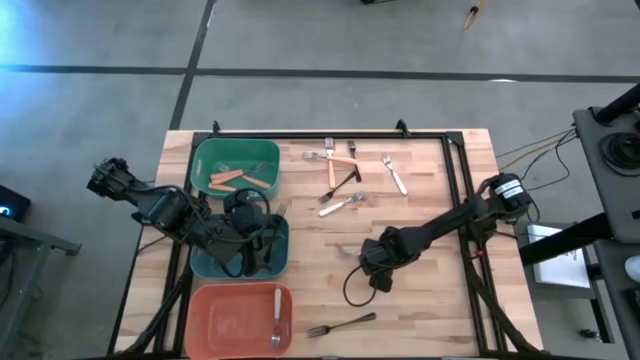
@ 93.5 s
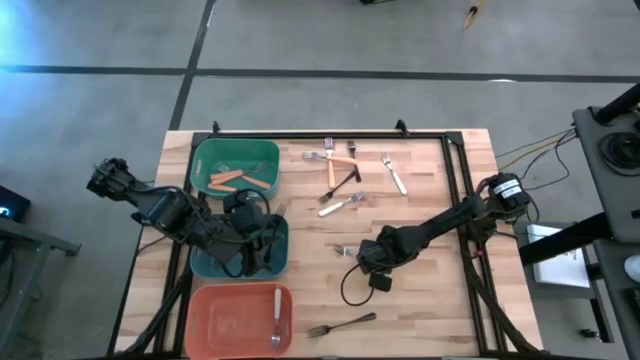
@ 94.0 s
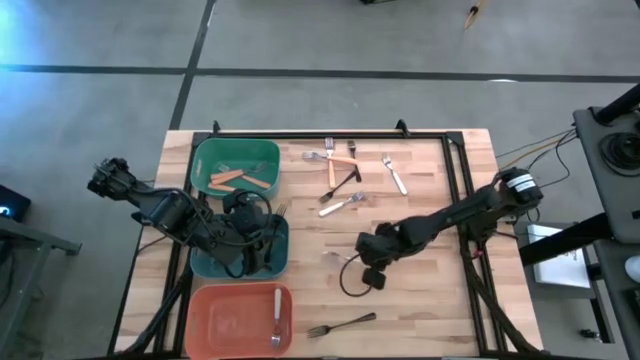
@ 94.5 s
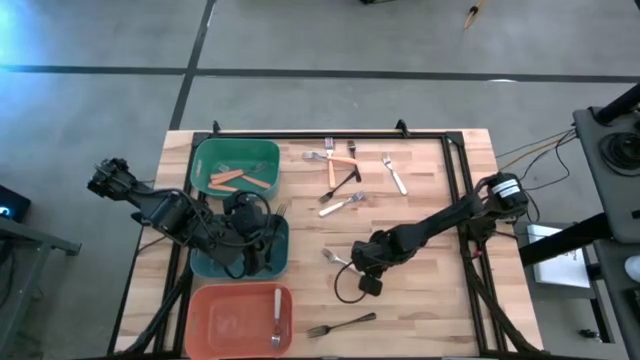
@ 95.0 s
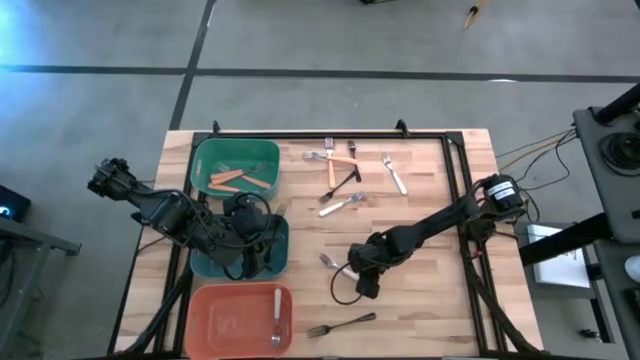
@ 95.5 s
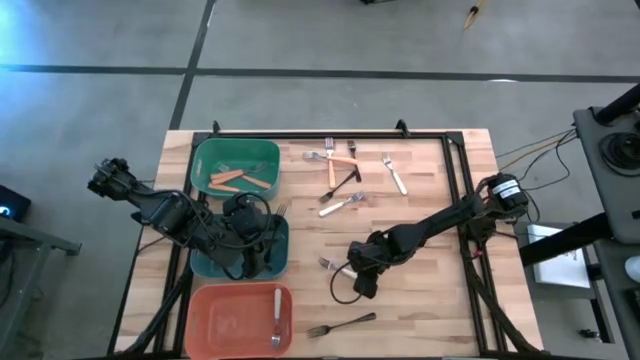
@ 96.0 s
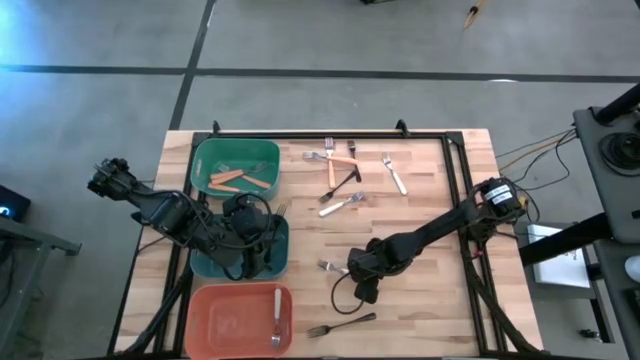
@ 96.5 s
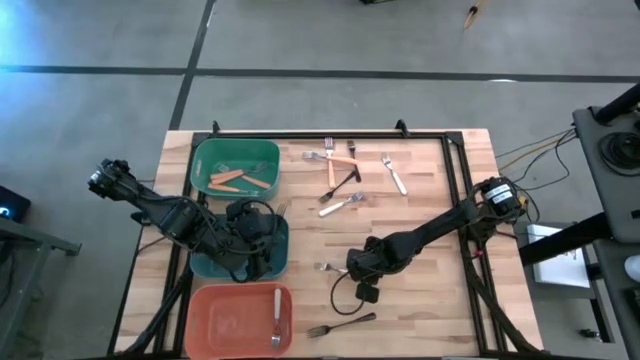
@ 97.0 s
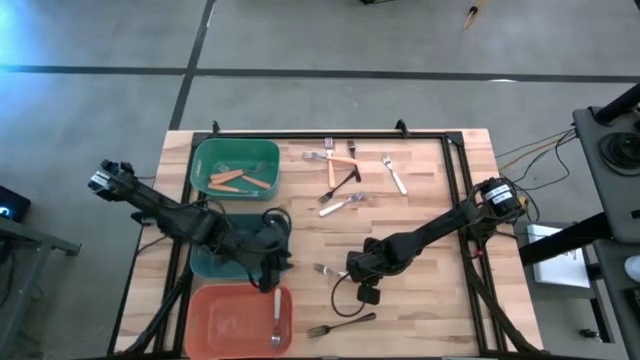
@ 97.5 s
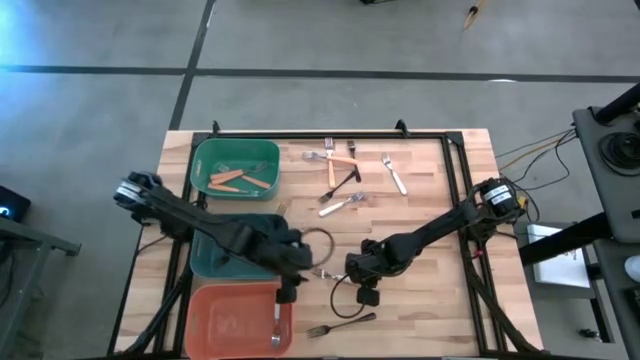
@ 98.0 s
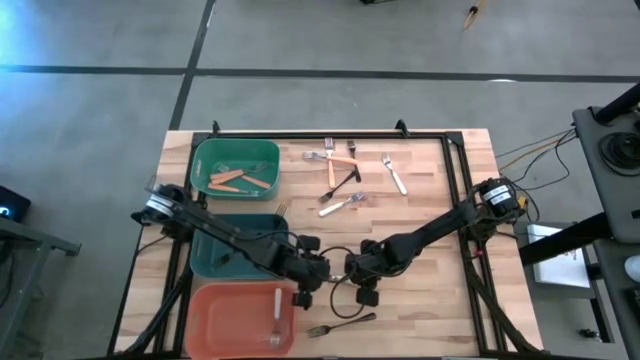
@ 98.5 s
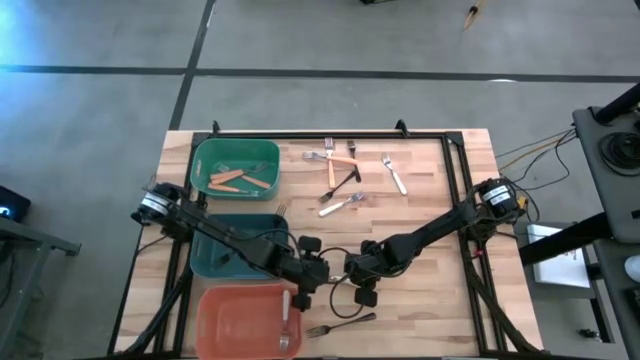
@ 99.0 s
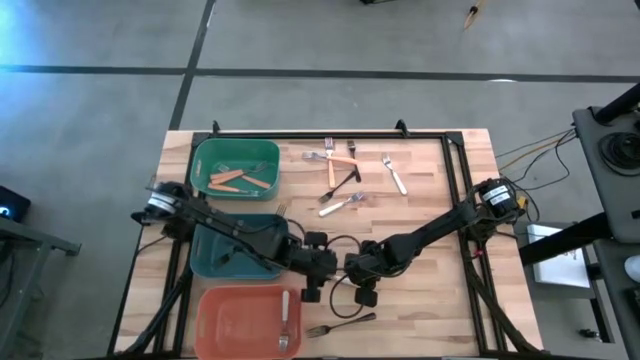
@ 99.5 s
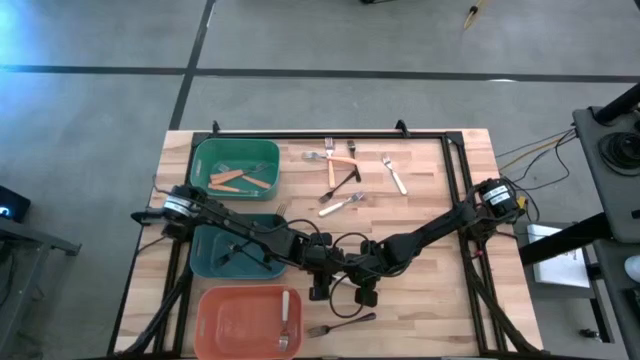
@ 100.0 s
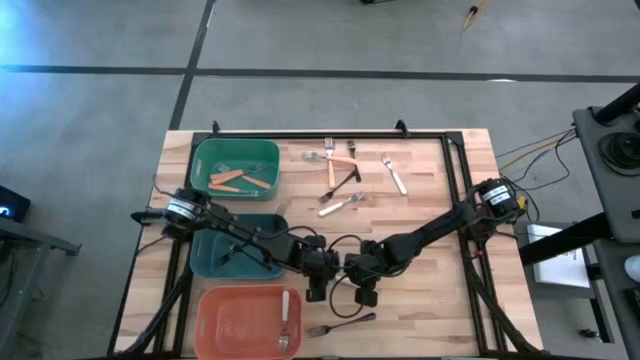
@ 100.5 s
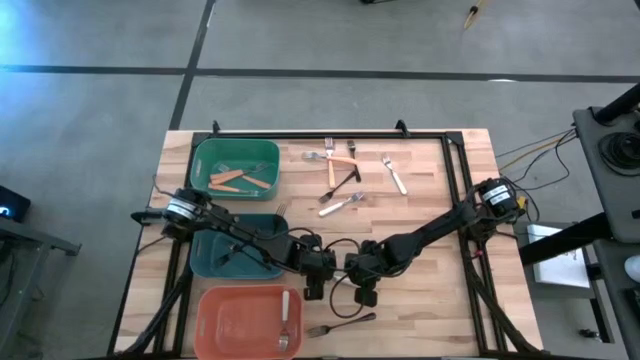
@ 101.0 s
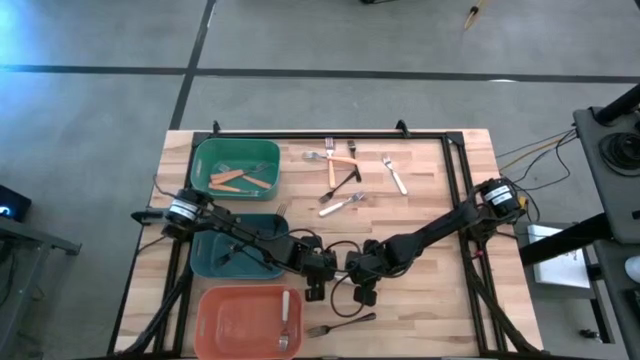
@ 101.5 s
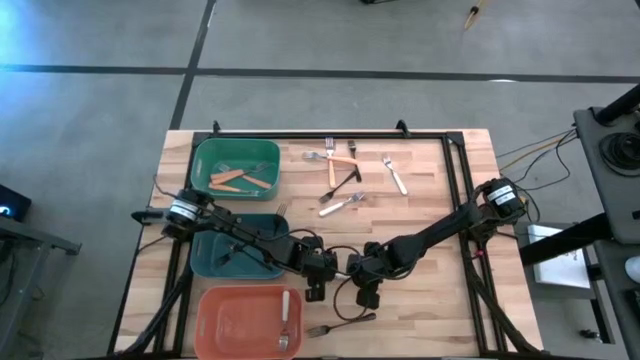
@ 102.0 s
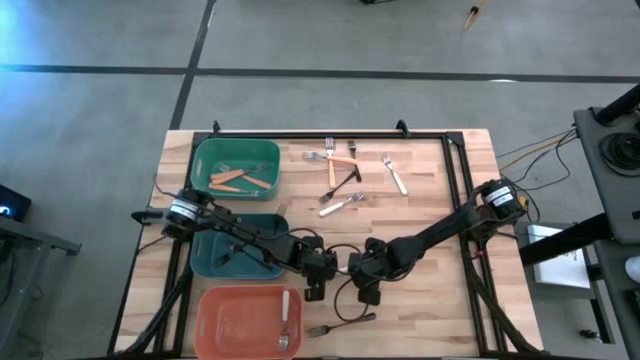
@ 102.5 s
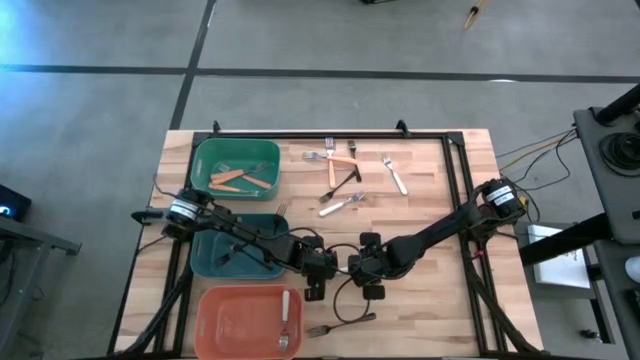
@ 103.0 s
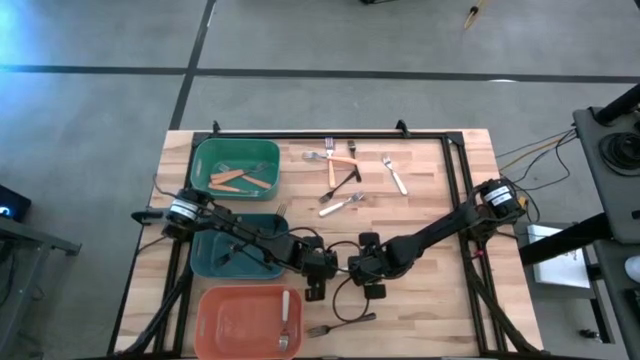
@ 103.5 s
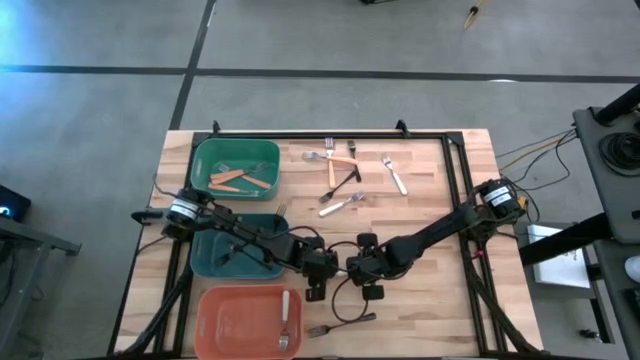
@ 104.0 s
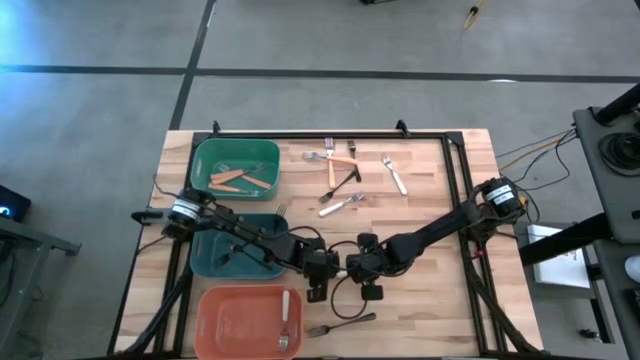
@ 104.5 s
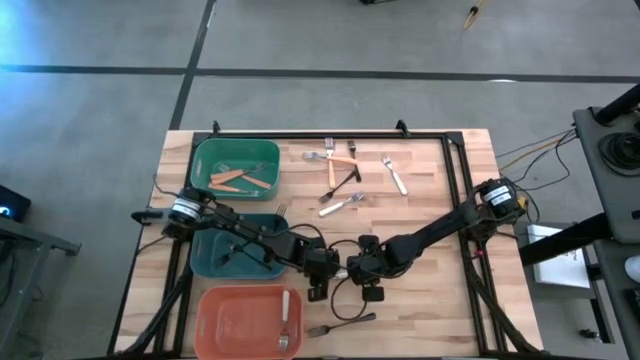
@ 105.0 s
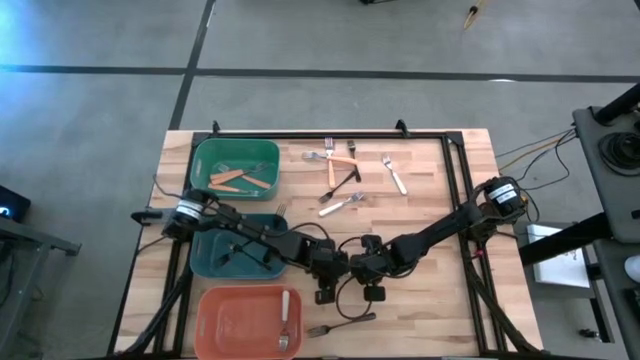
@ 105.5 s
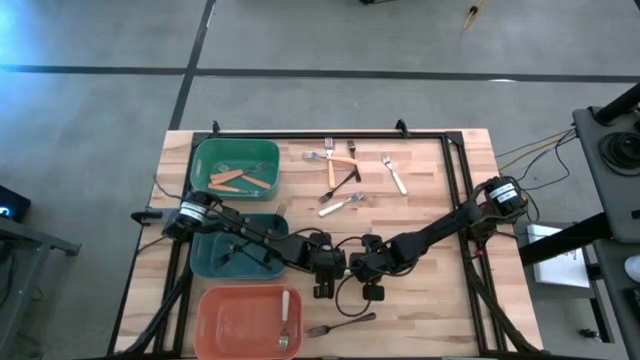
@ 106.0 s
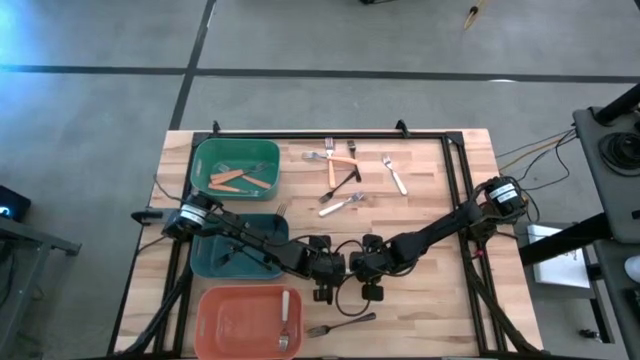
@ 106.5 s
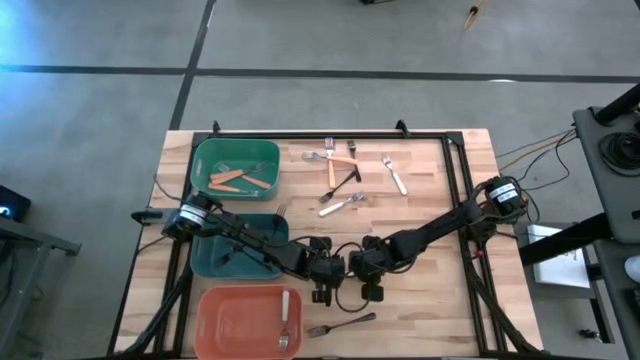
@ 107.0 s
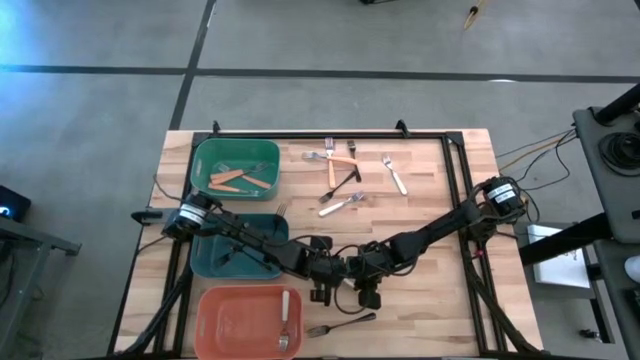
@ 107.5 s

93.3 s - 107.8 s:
Task: Sort silverware by color (type)
Put the white fork into the orange bin

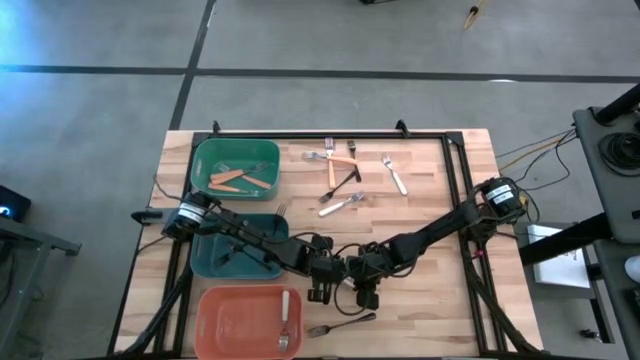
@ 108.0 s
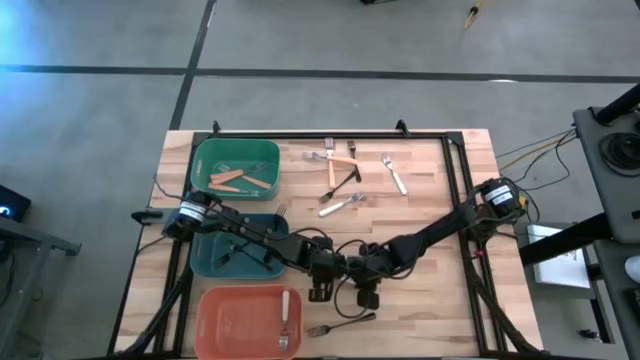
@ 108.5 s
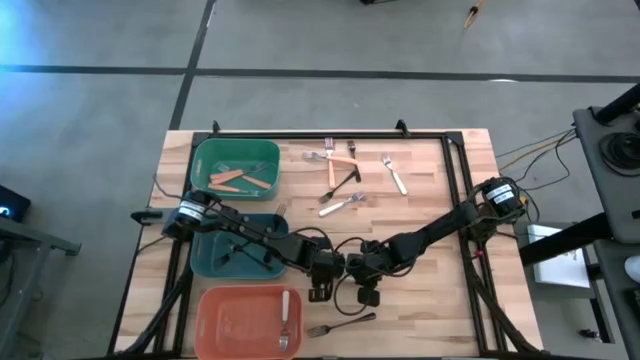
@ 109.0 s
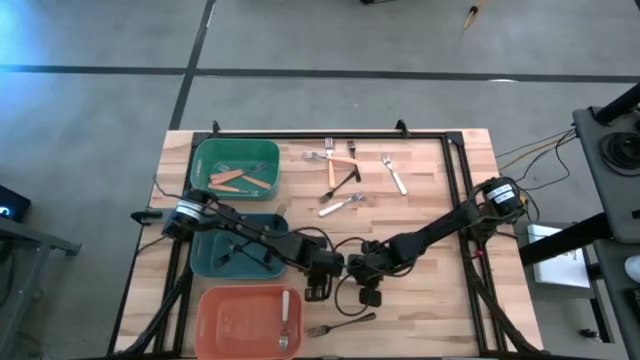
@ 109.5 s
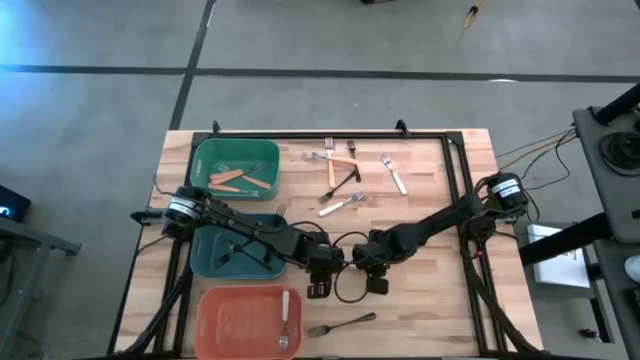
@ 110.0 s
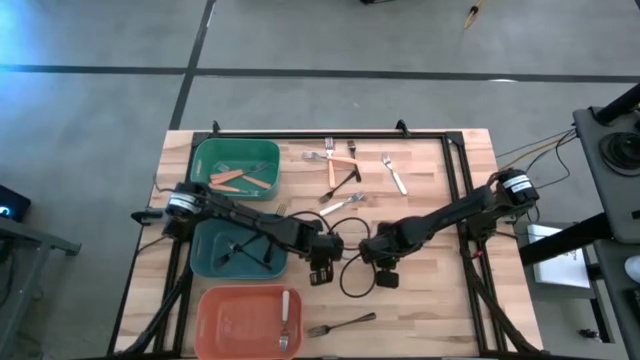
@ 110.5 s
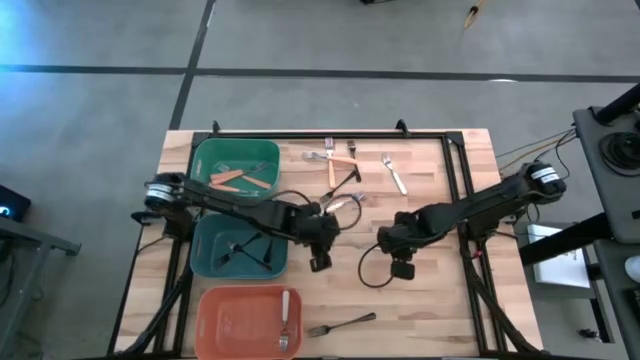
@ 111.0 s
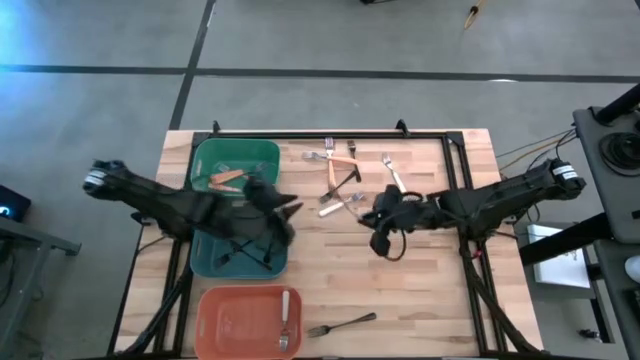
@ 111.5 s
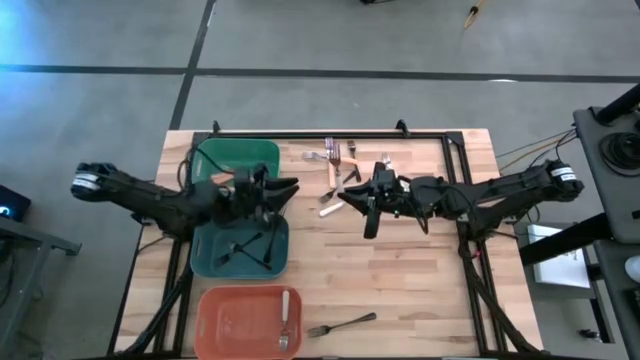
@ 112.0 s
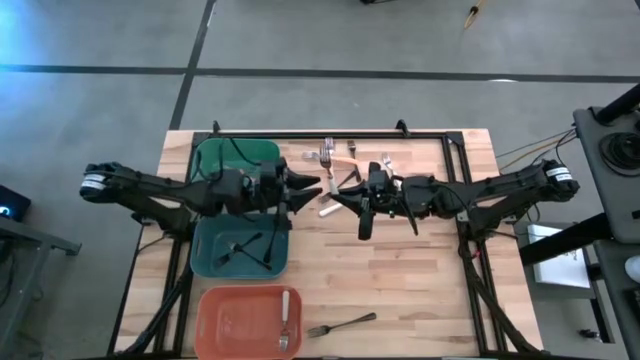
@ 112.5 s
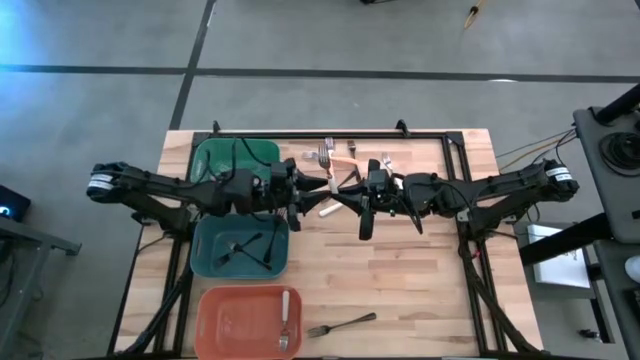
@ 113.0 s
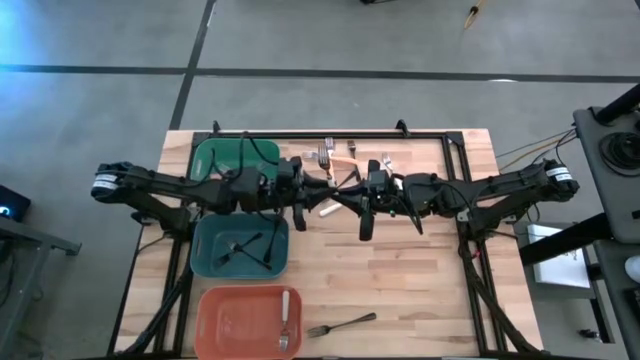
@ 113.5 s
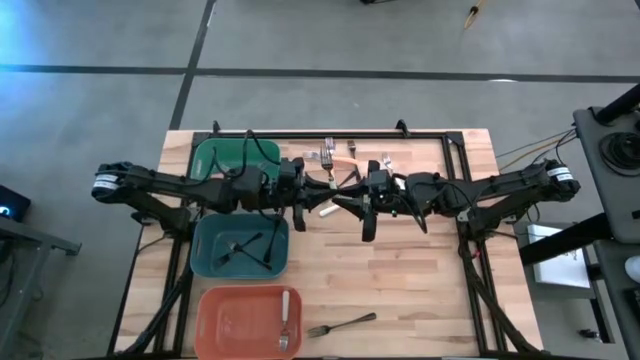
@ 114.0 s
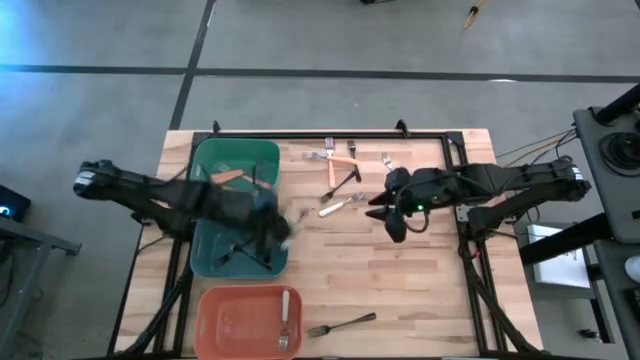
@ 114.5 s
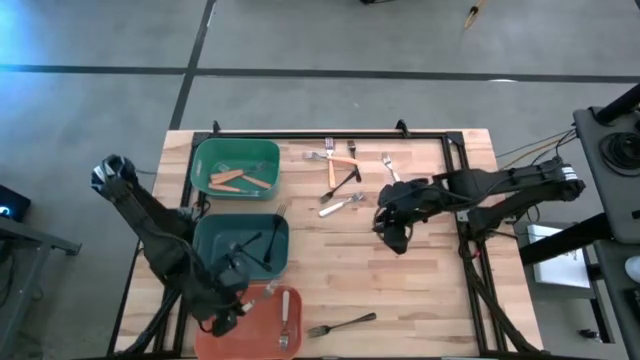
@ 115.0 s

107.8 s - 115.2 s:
Put the white fork into the orange bin
